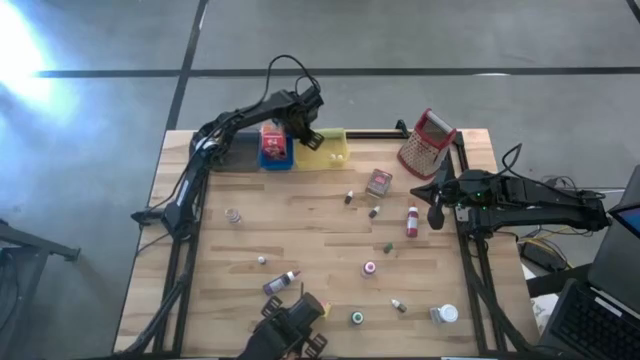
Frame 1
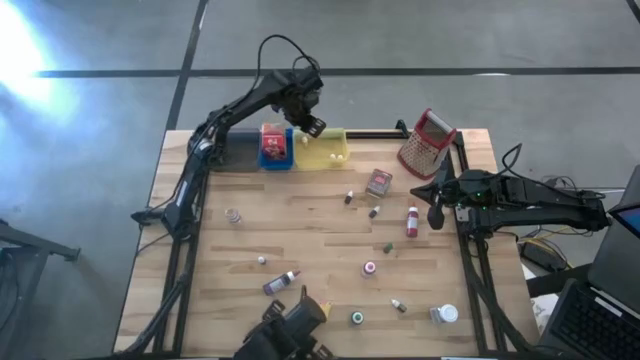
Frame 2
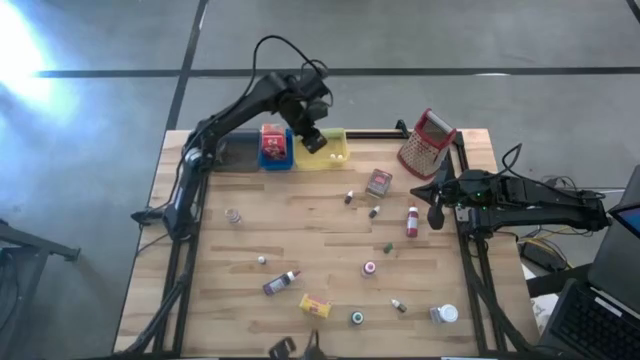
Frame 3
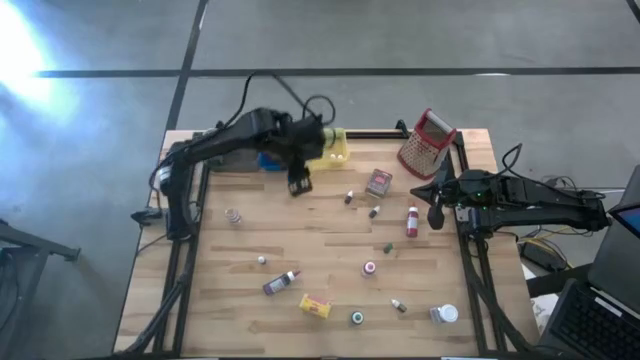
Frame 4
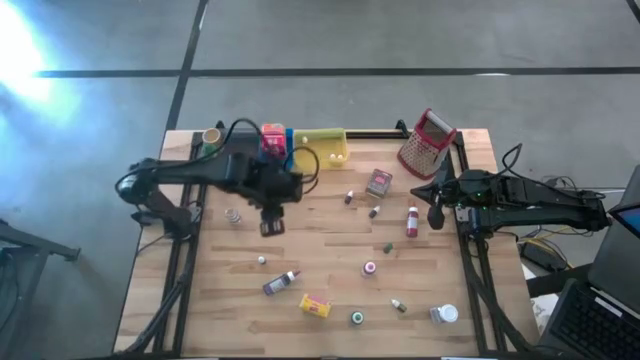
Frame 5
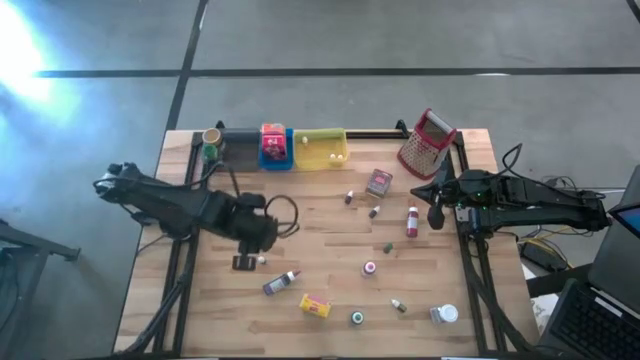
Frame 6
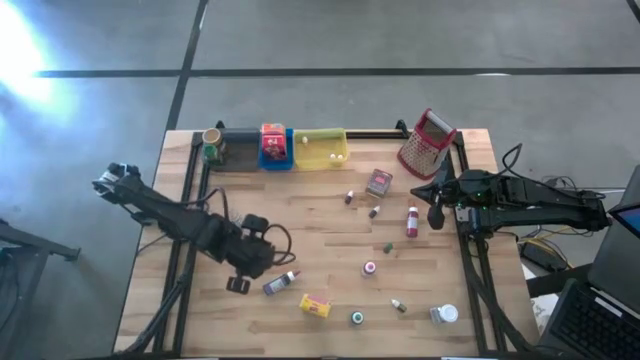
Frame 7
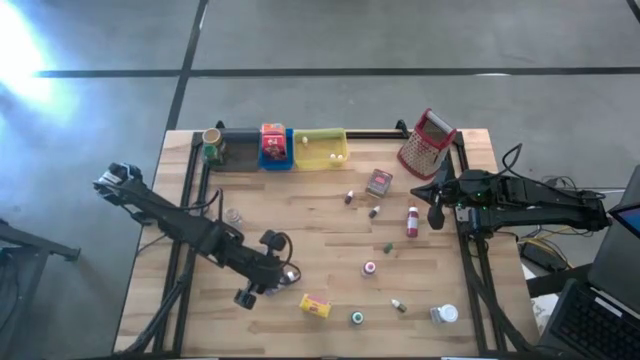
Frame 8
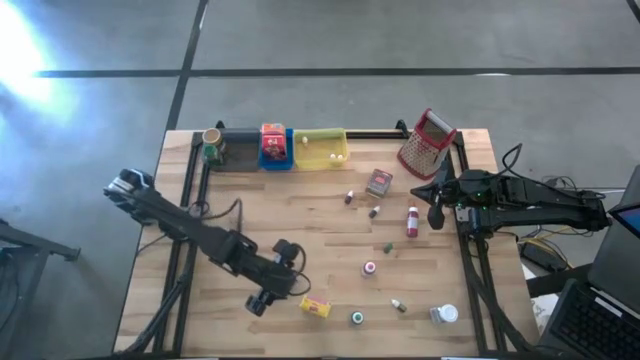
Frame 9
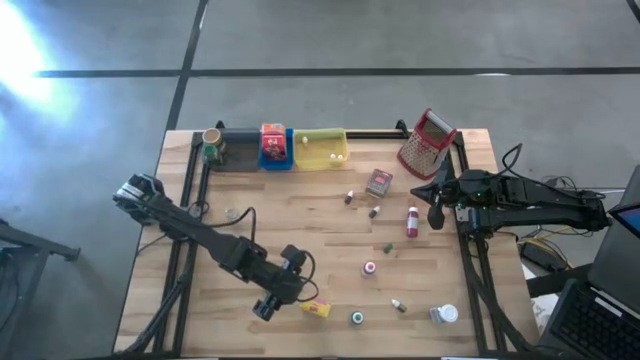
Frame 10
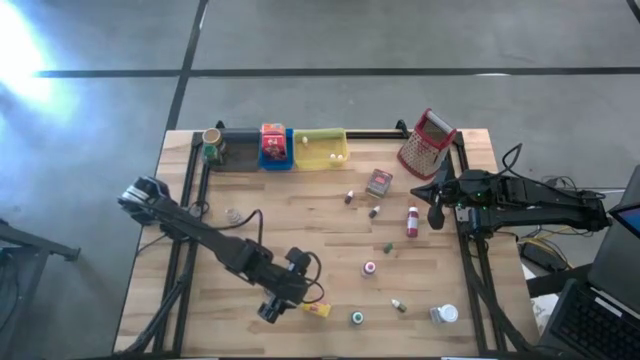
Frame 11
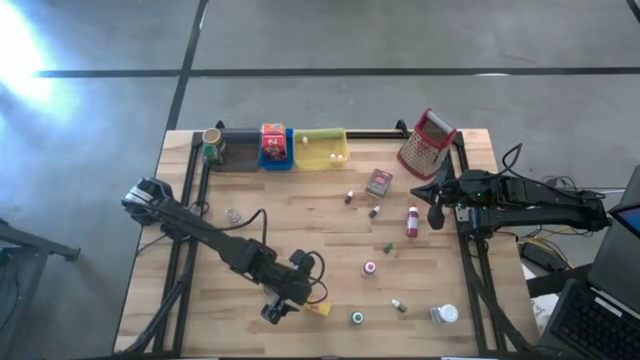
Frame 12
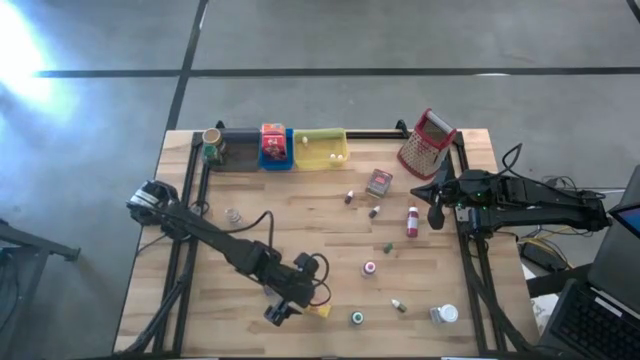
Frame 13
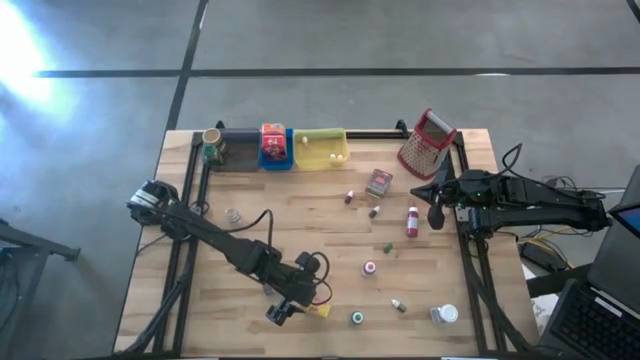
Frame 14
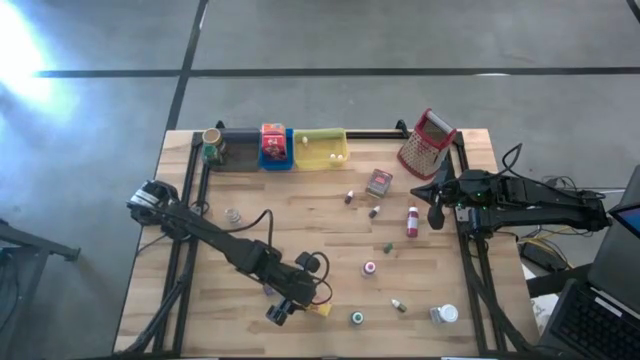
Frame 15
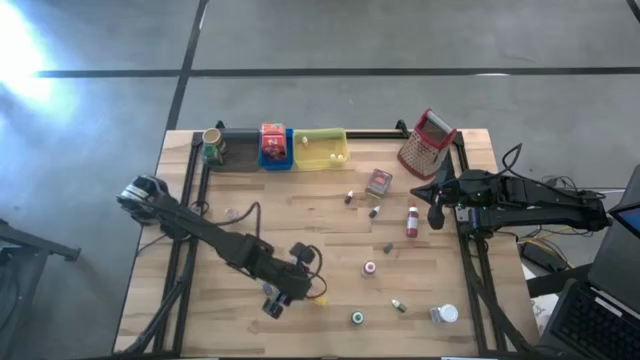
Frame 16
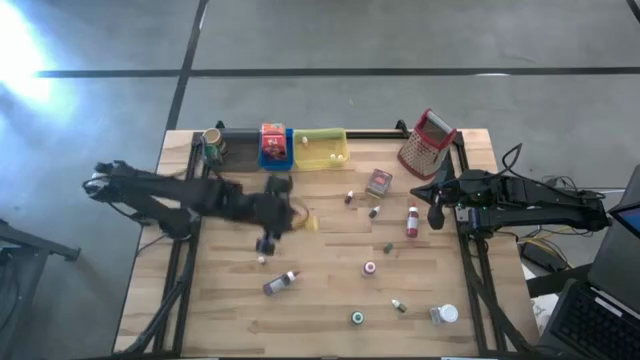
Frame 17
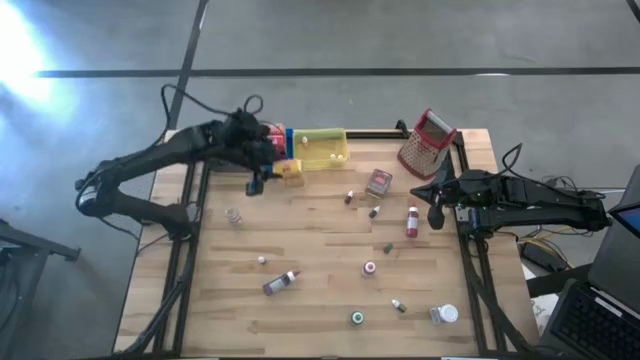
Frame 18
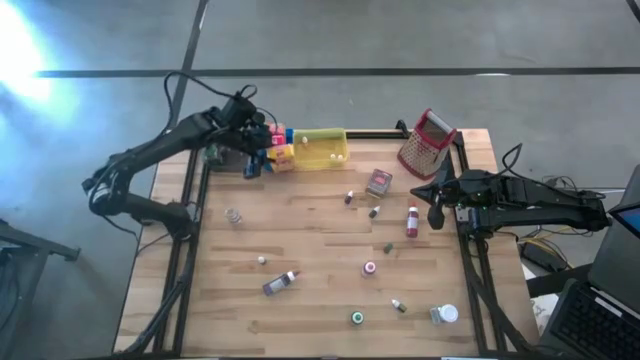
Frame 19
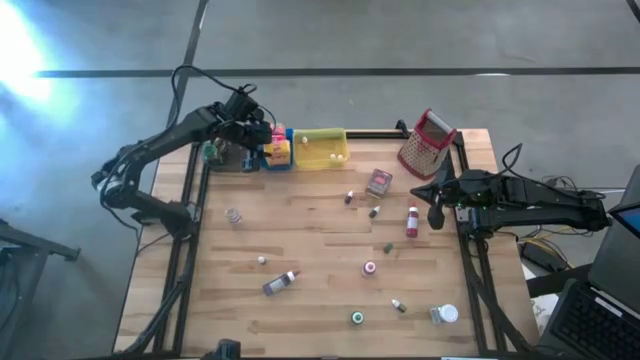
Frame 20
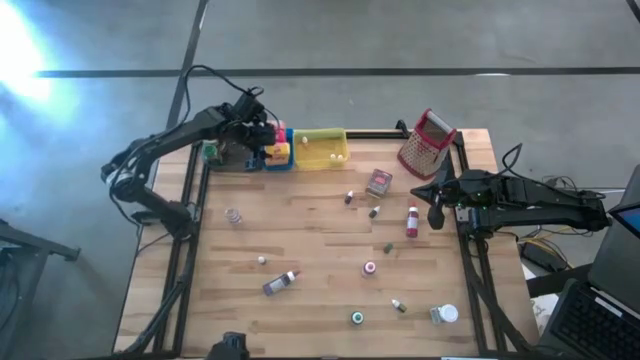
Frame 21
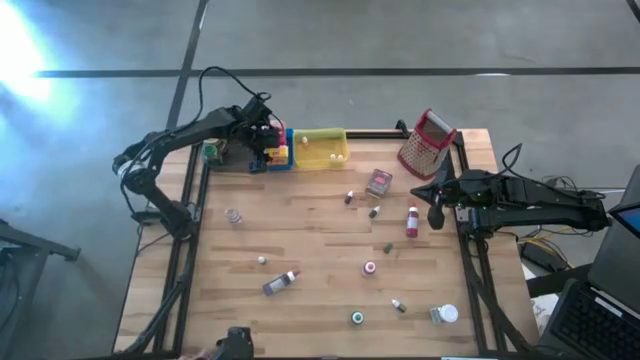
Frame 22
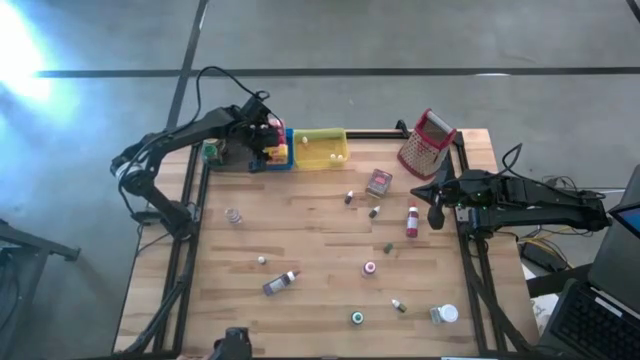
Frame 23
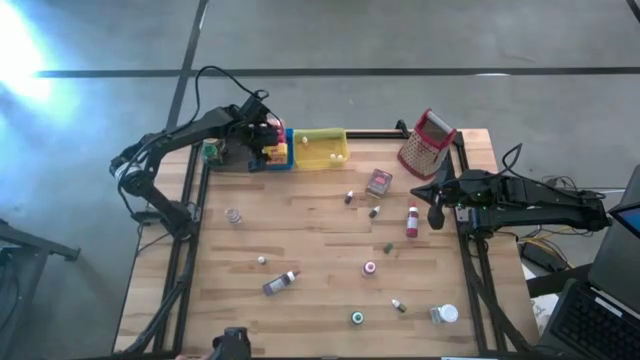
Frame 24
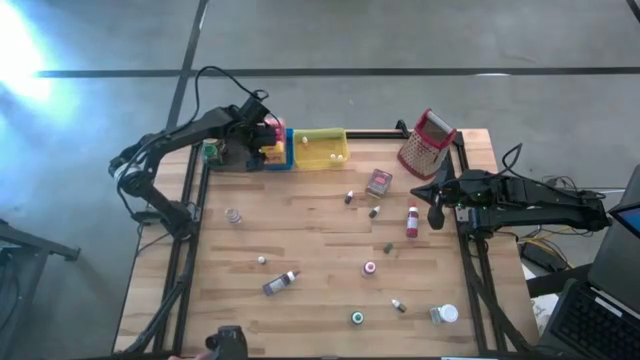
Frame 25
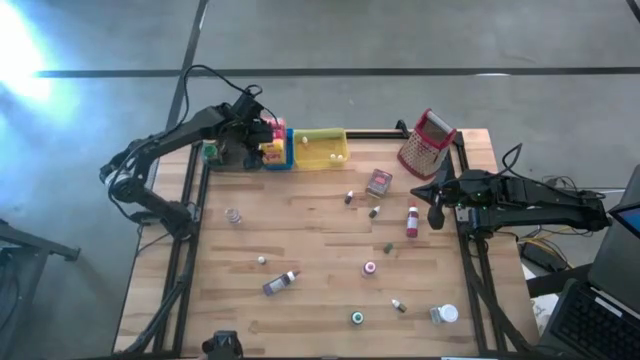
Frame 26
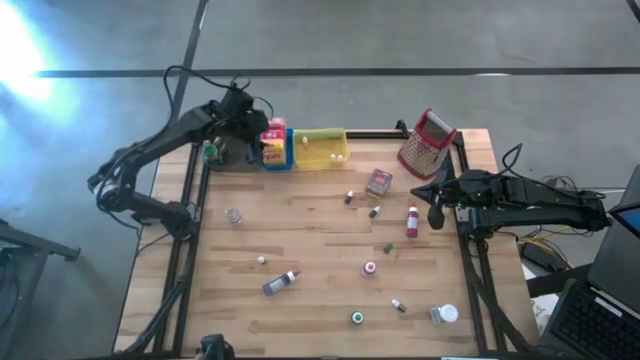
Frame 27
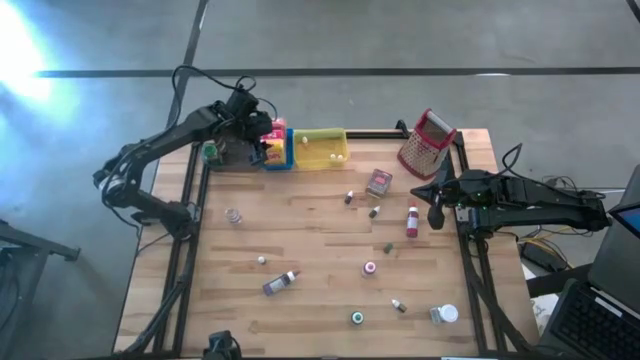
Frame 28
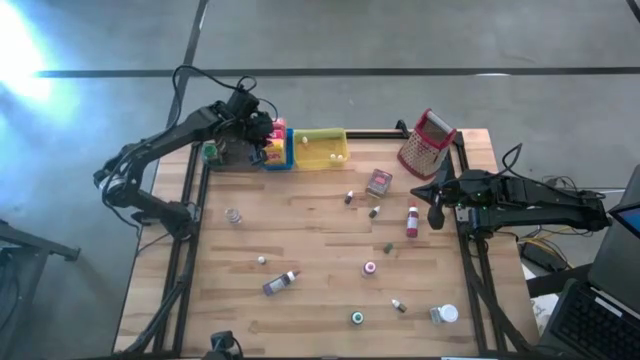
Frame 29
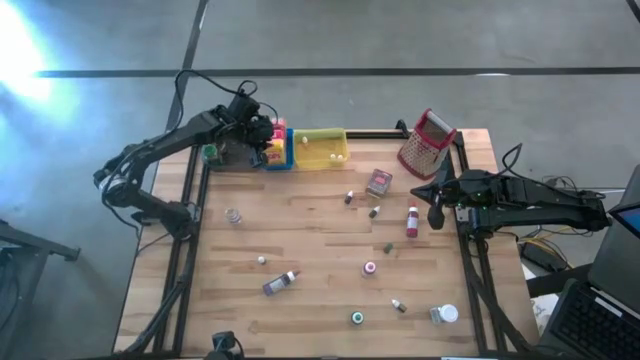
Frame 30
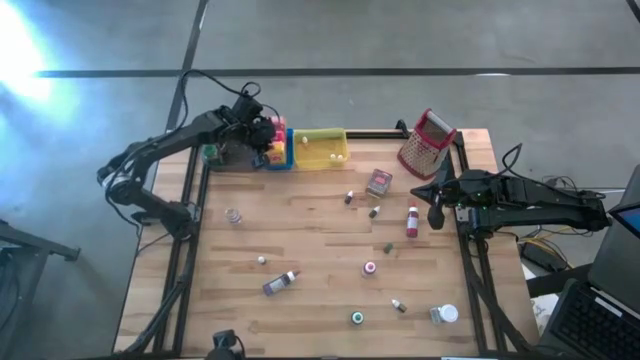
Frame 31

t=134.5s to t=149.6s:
Task: Pick & Place Kitchen Items
Put the yellow cereal box into the blue bin

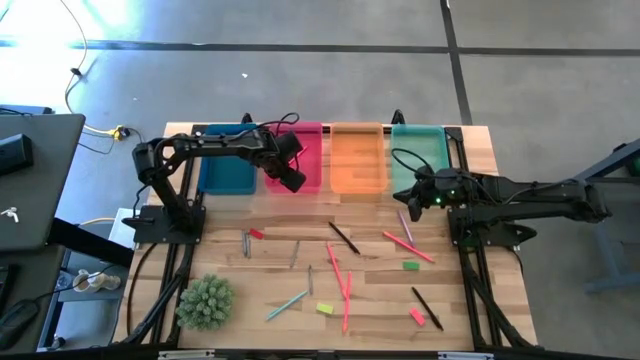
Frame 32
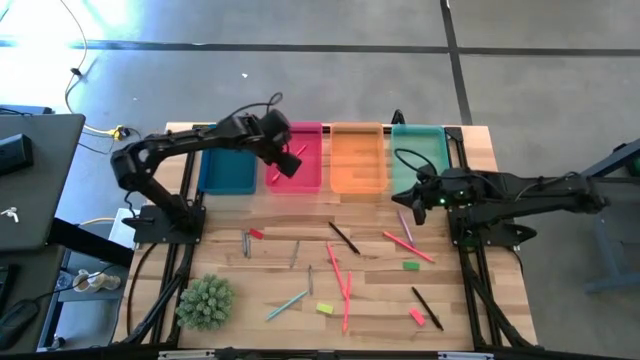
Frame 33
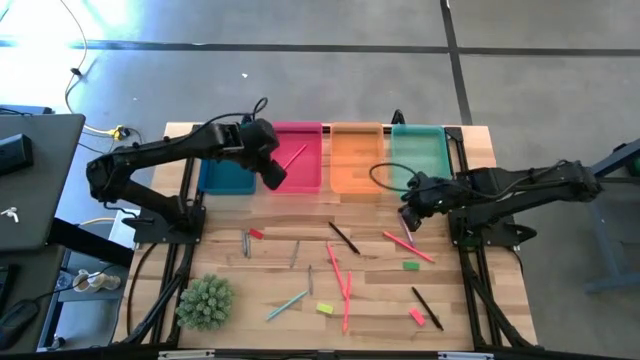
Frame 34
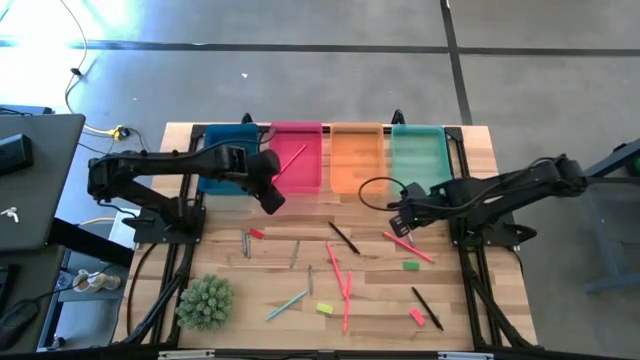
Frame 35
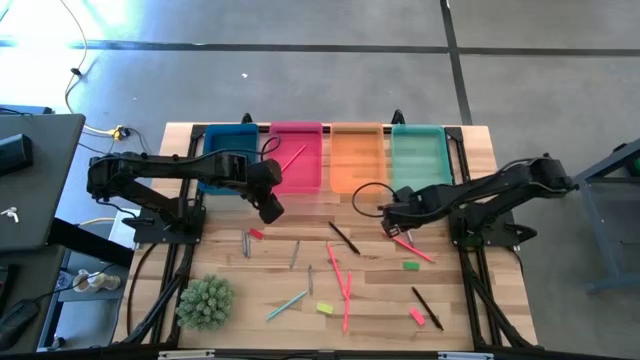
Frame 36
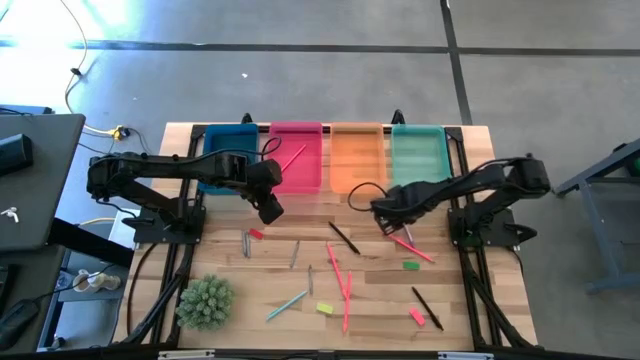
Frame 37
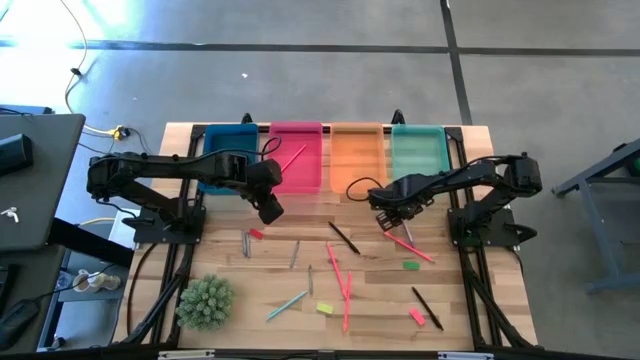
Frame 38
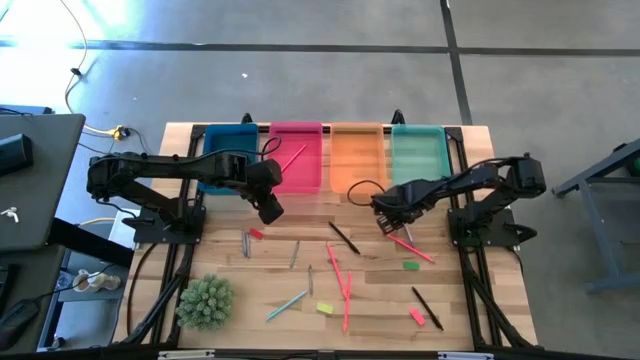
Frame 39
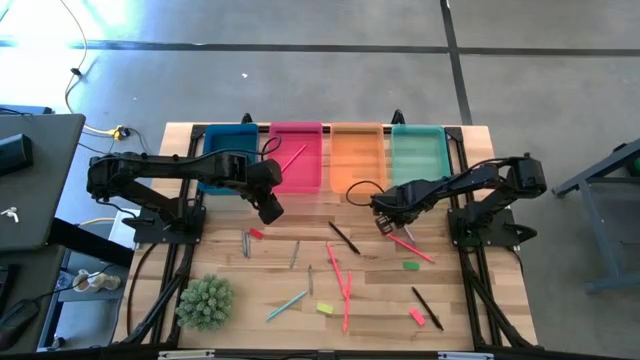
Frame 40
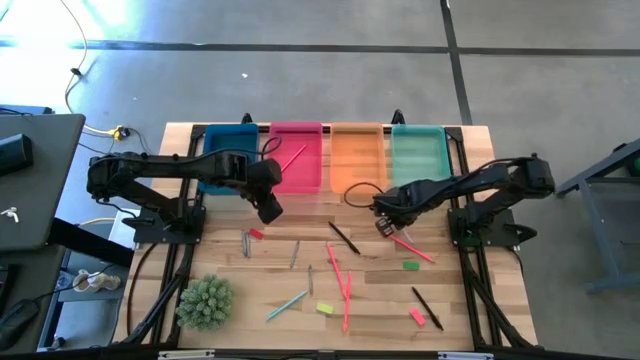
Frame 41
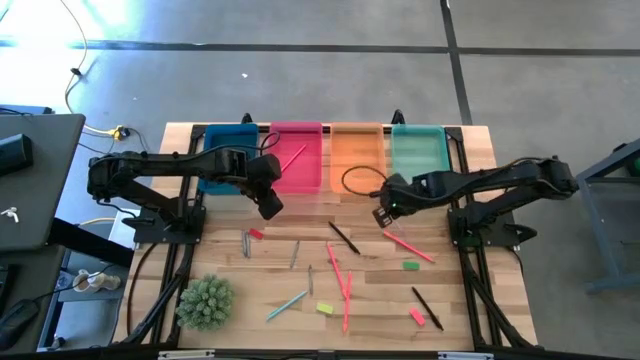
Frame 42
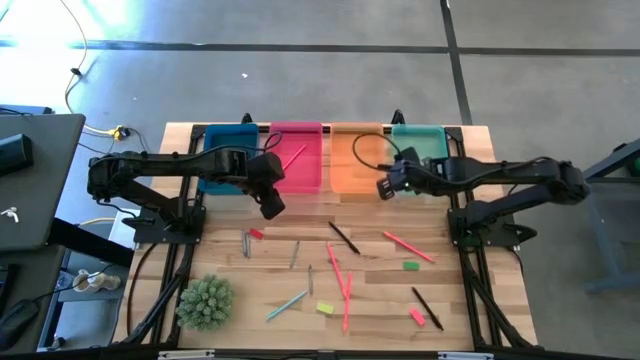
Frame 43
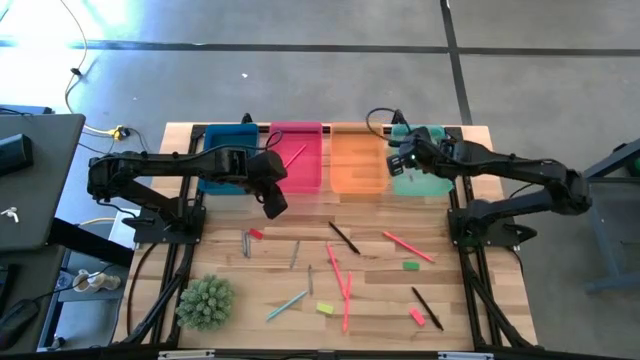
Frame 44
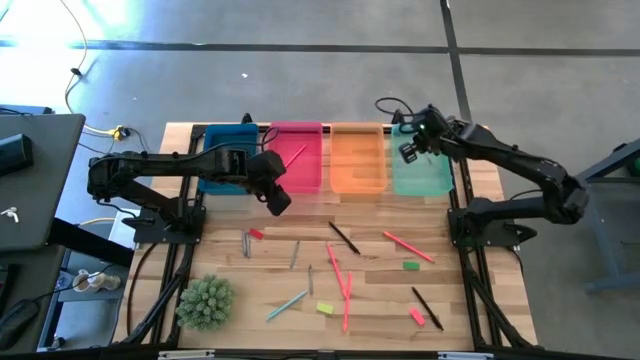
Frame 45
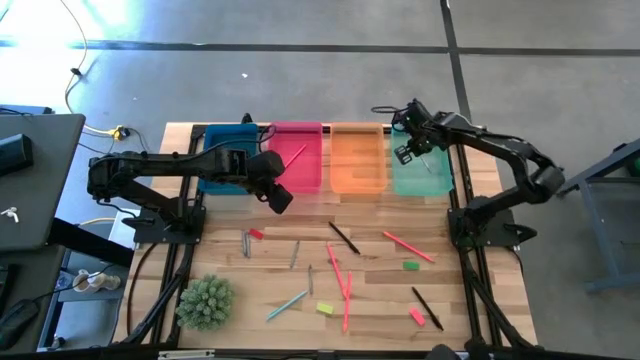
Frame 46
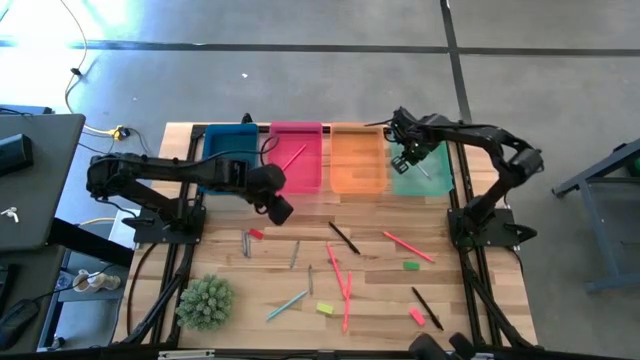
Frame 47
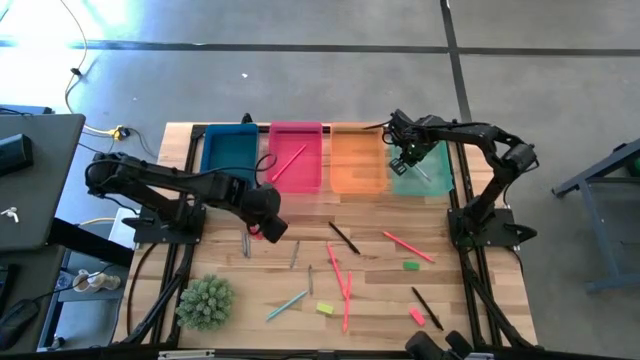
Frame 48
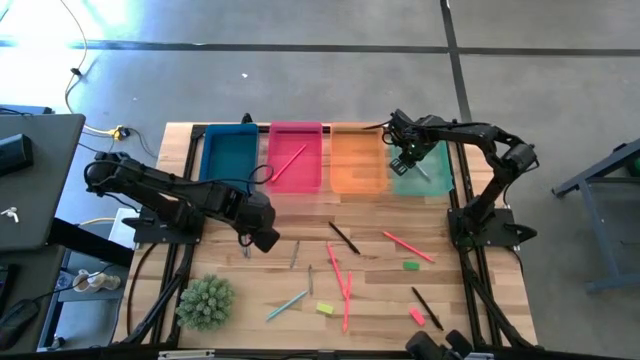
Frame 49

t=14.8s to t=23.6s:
Task: Sort crayons/erasers/pens/pencils in bins
Put the purple pen into the green bin
